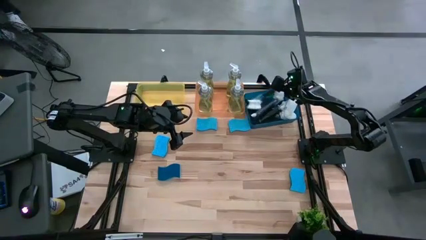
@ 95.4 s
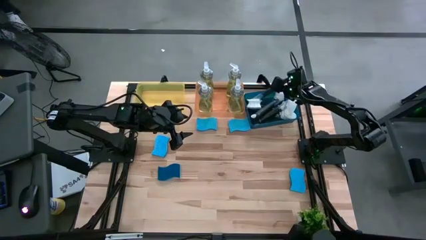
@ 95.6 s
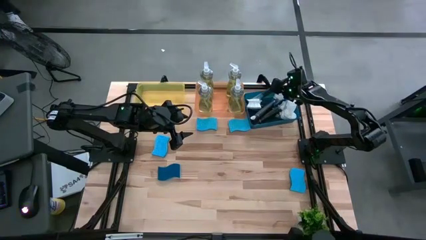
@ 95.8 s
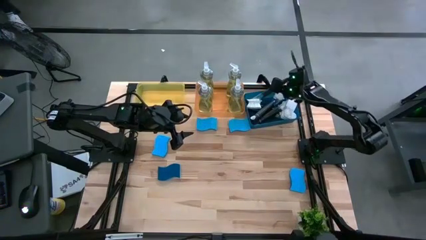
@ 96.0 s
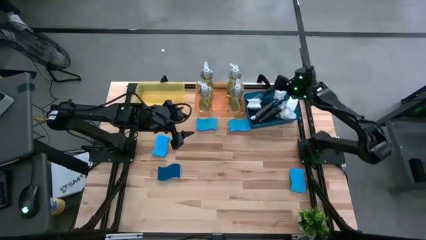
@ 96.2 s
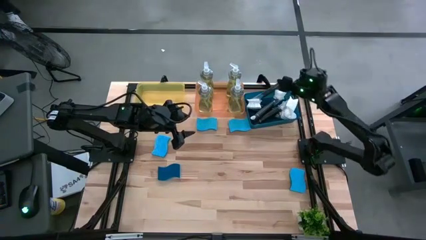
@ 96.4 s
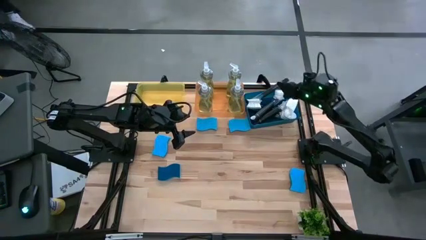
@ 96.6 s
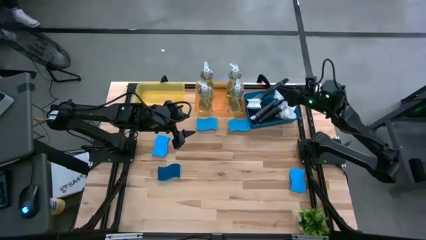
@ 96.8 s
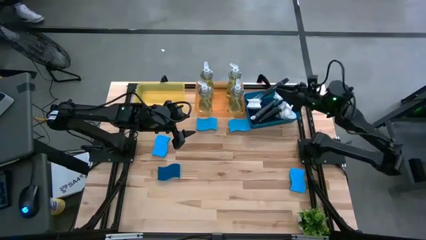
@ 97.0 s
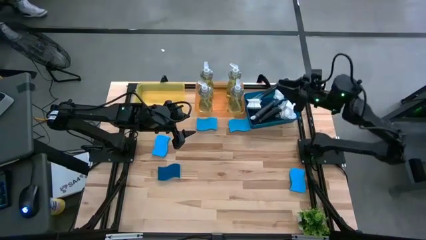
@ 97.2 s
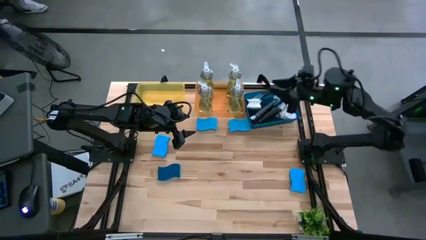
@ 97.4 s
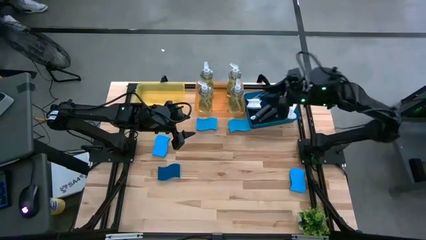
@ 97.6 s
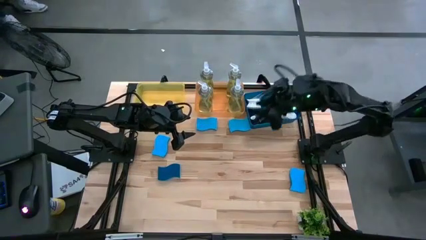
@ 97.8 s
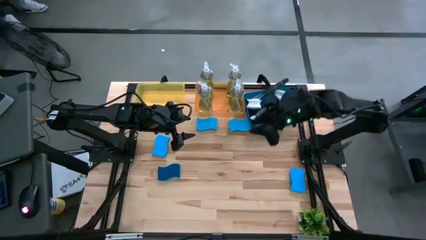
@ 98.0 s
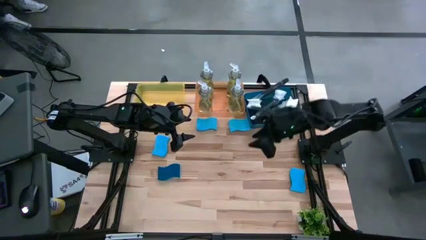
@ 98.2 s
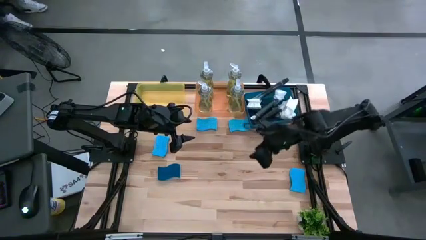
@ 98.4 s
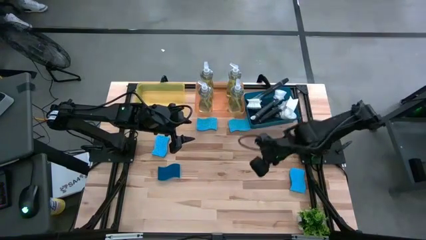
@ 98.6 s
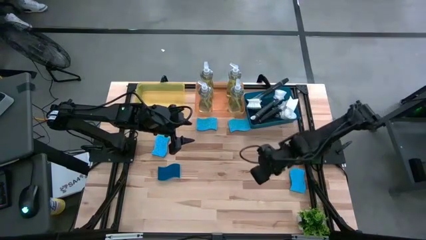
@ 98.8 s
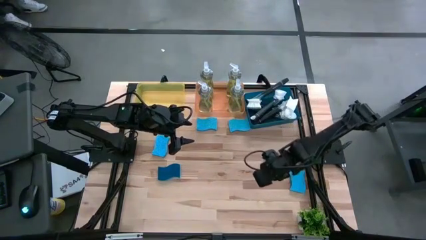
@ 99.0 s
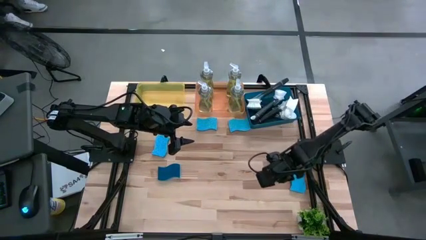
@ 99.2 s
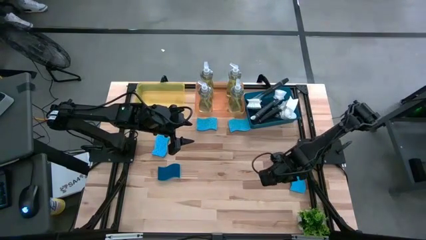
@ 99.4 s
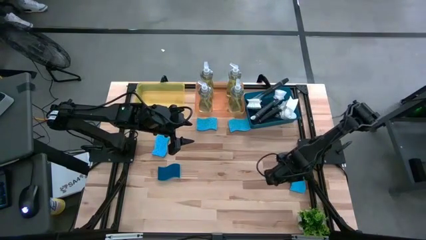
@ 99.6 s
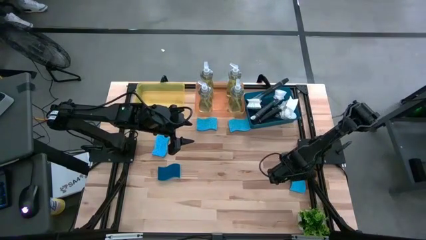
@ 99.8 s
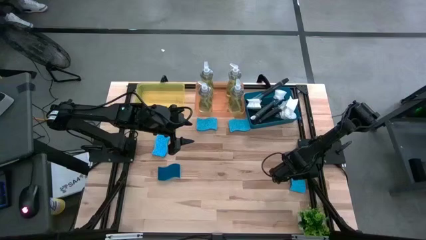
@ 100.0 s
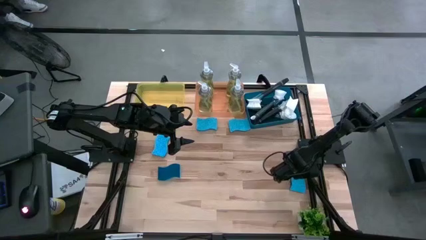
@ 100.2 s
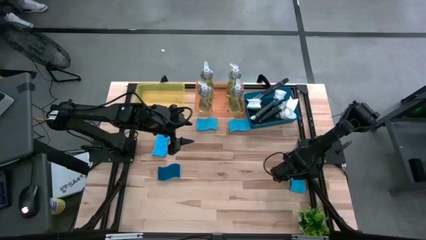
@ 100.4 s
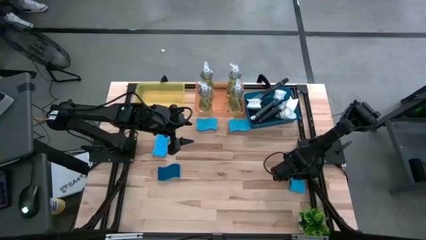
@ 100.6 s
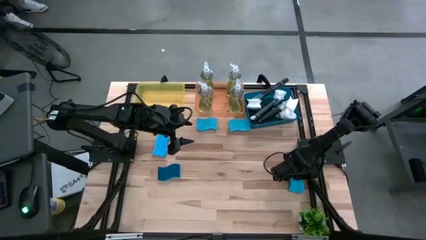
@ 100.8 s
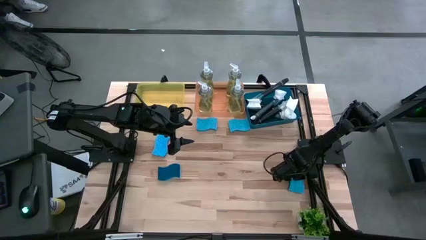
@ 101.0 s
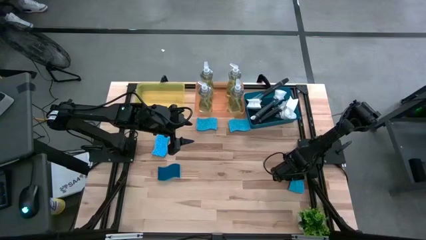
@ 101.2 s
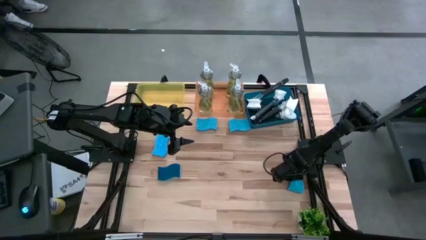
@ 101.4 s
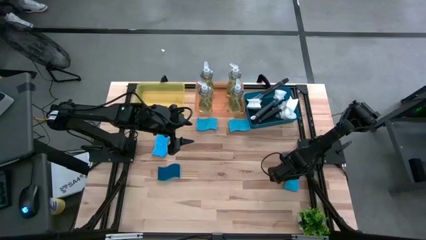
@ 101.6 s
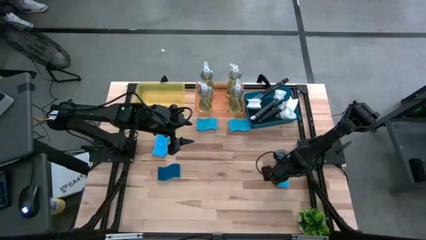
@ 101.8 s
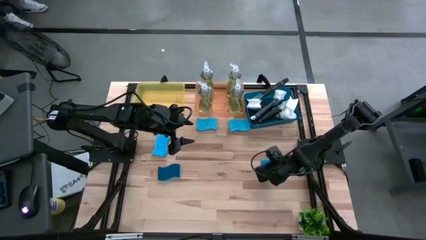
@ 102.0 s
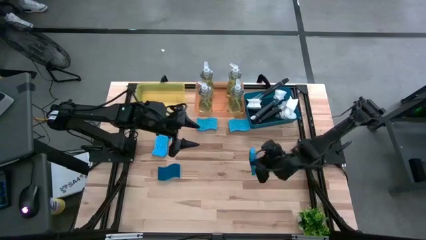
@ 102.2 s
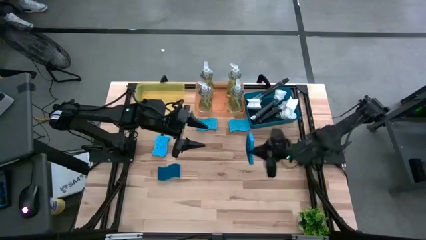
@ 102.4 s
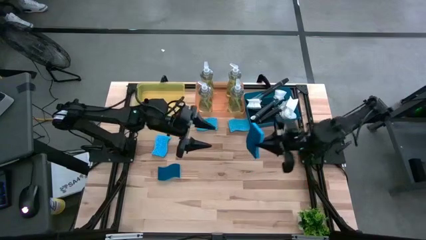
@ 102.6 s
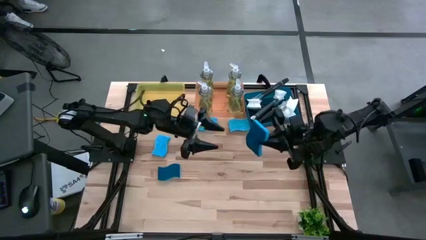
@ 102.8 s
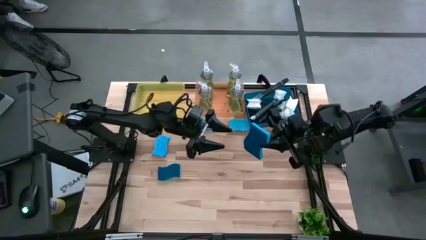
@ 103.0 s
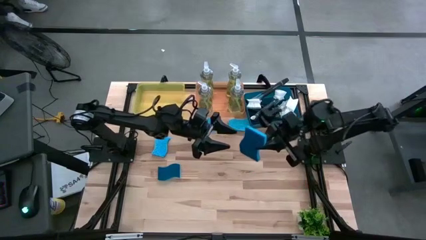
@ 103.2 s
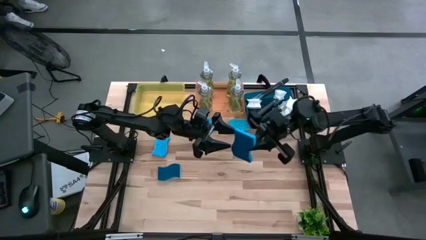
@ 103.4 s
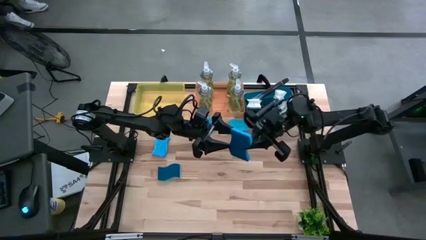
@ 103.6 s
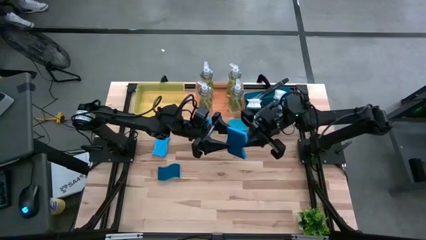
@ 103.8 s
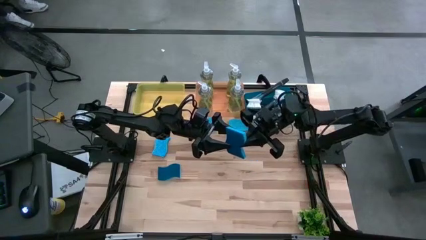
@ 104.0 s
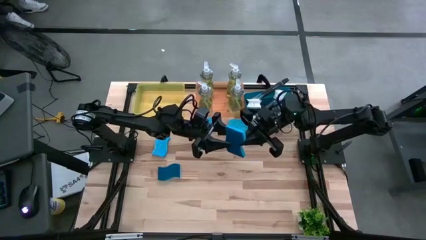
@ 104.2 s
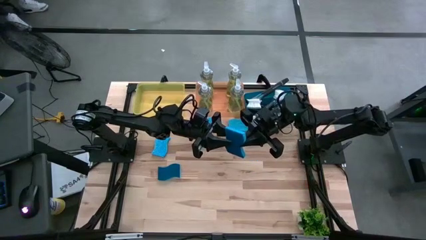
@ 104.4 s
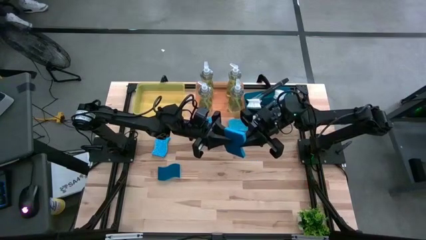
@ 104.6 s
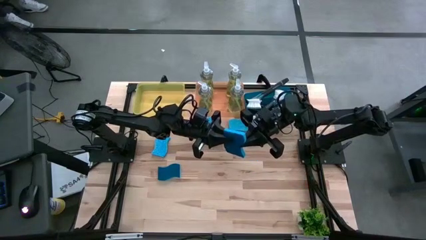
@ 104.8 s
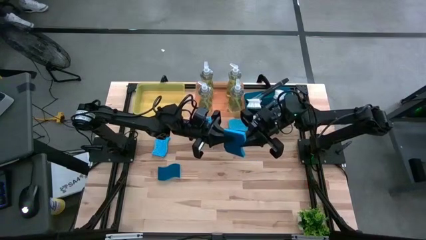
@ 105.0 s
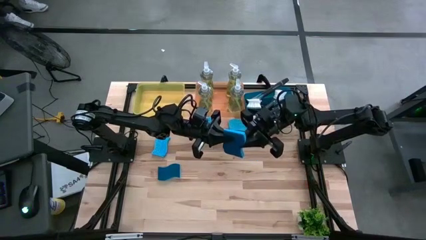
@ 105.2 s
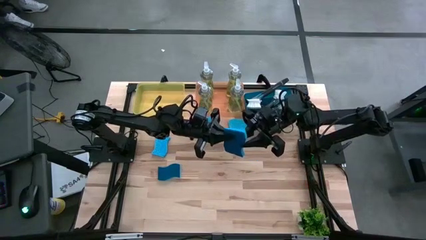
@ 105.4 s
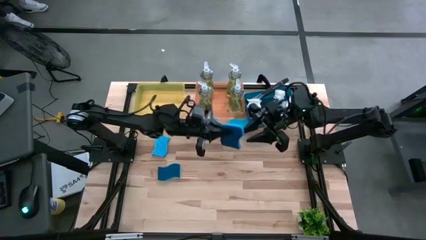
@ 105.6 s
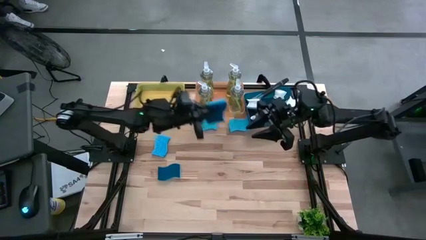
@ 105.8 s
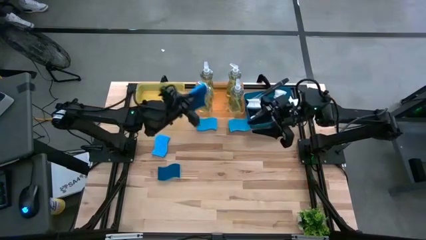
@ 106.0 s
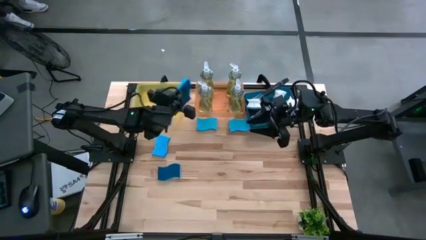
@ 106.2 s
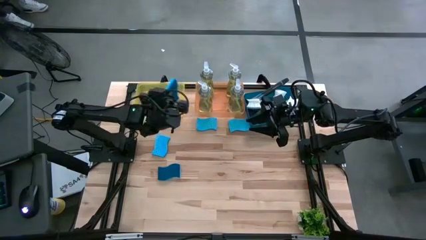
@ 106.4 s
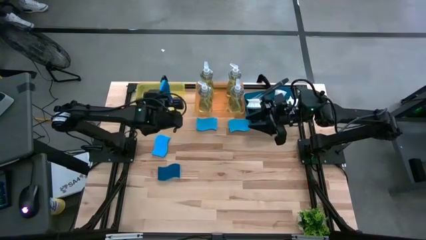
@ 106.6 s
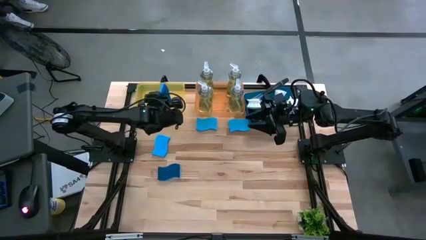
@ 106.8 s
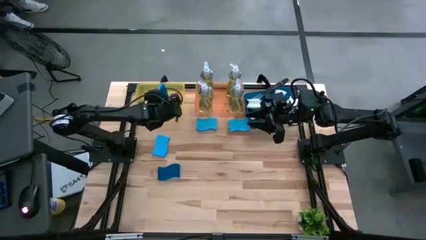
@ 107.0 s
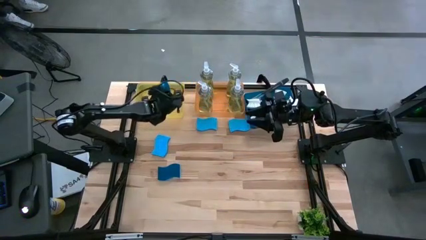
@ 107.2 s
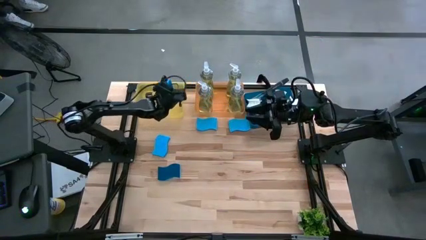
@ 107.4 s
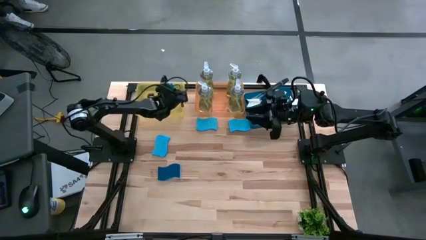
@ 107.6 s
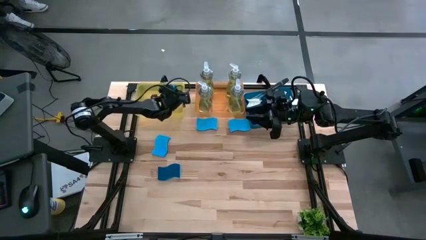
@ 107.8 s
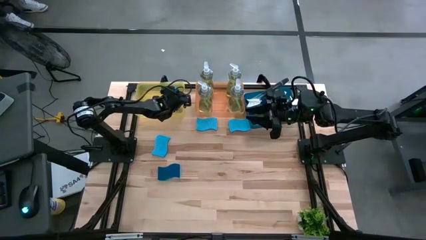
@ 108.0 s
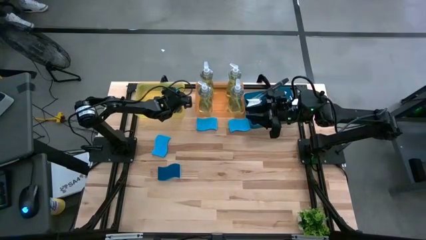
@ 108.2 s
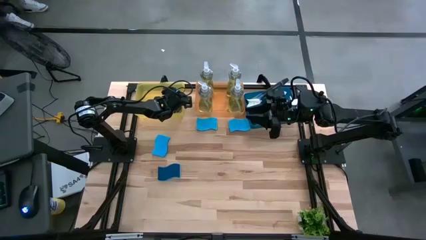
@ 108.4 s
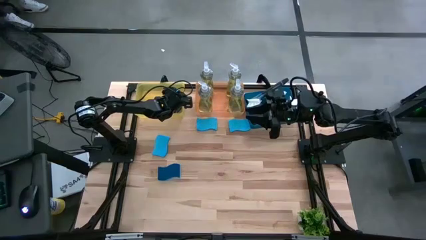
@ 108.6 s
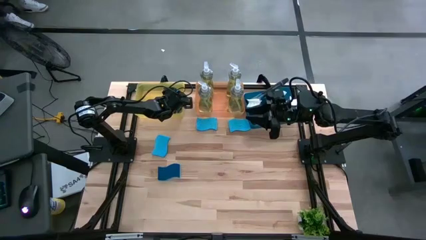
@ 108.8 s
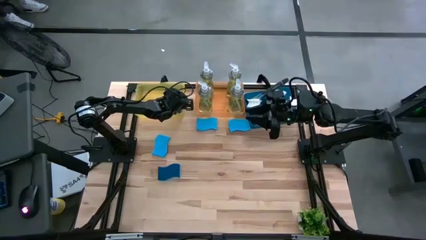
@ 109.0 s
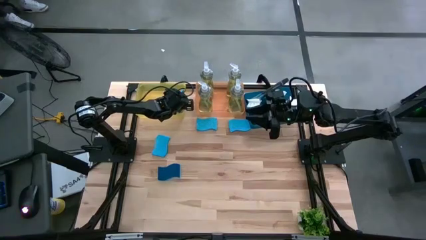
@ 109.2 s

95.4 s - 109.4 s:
Task: Pick & Place Kitchen Sink Supplies
Put the blue sponge into the yellow bin
